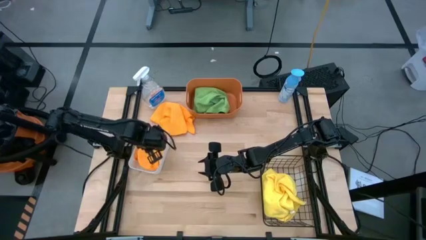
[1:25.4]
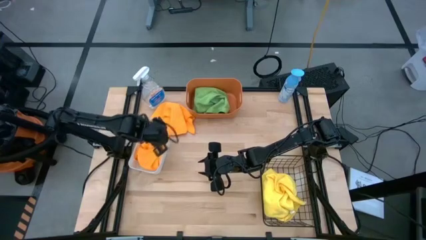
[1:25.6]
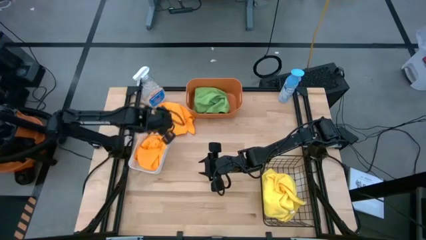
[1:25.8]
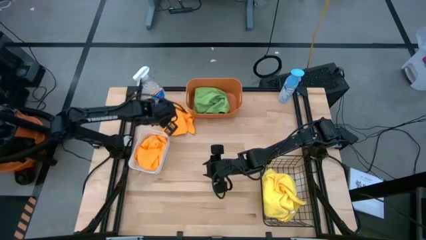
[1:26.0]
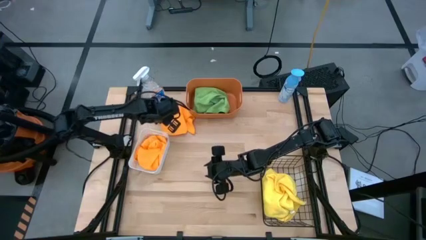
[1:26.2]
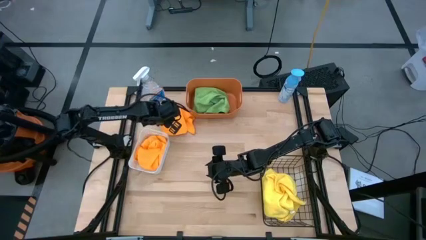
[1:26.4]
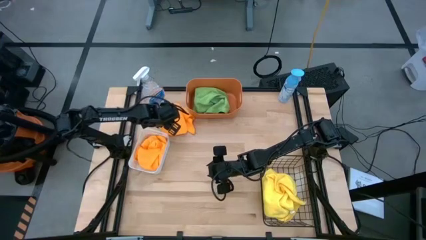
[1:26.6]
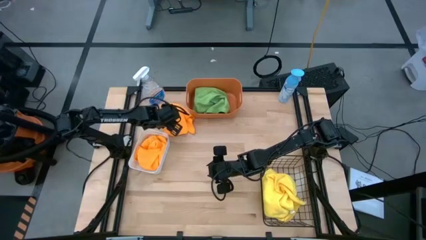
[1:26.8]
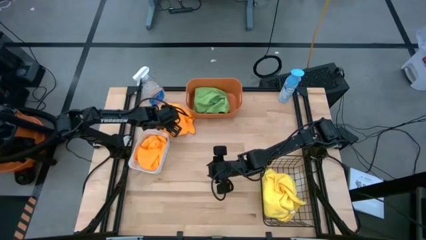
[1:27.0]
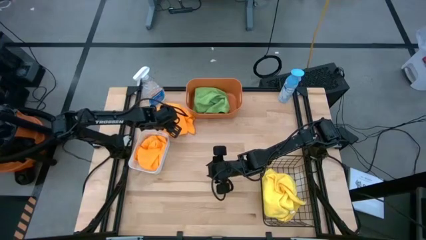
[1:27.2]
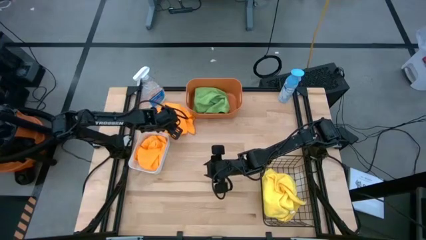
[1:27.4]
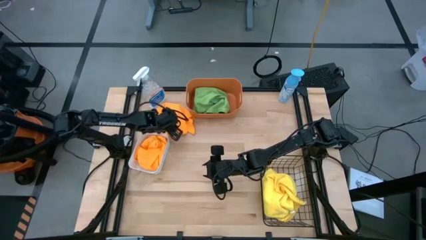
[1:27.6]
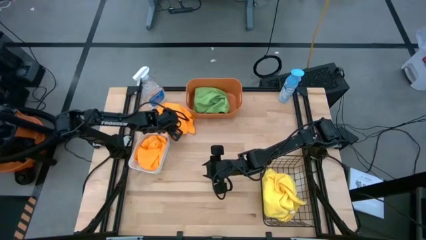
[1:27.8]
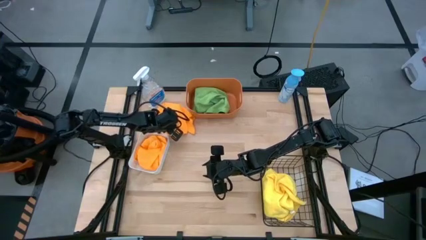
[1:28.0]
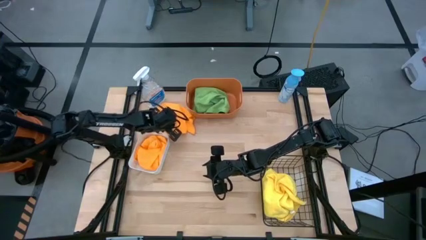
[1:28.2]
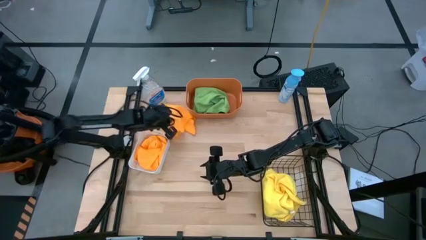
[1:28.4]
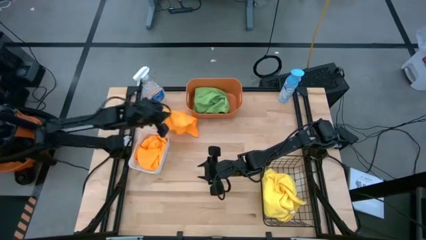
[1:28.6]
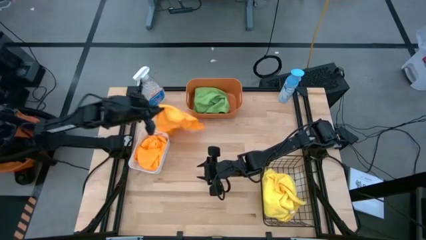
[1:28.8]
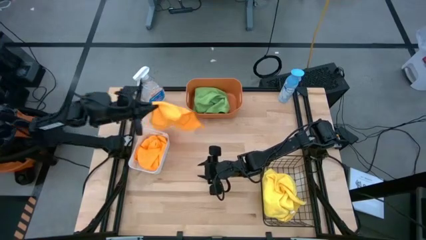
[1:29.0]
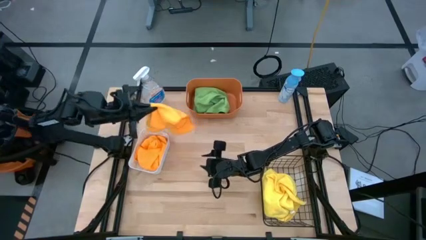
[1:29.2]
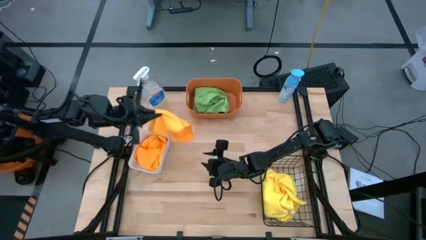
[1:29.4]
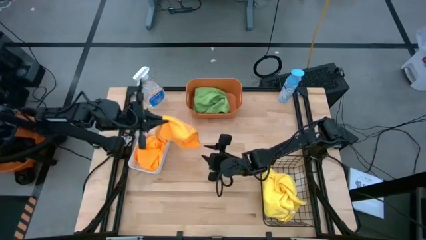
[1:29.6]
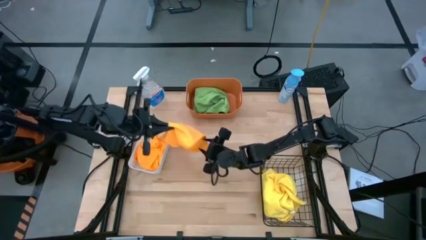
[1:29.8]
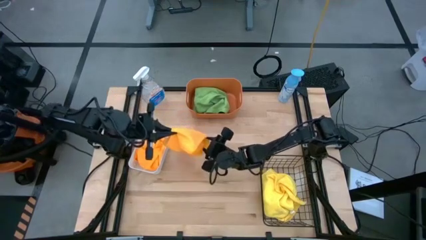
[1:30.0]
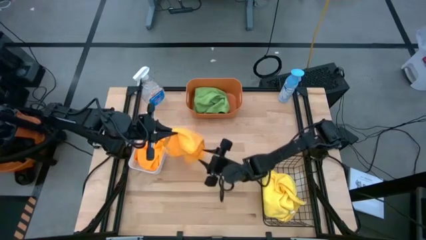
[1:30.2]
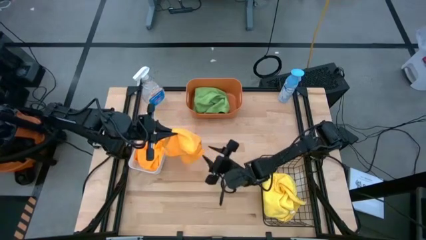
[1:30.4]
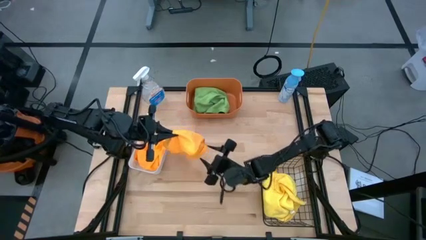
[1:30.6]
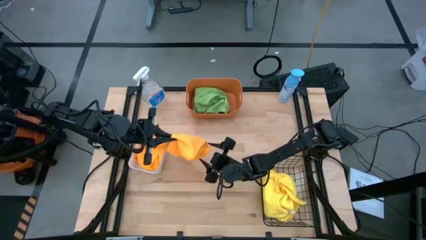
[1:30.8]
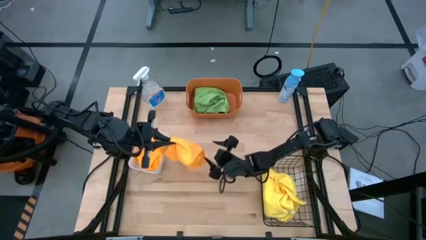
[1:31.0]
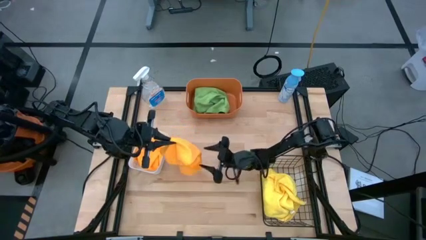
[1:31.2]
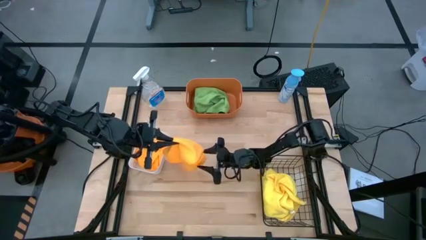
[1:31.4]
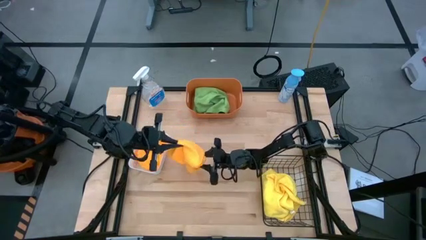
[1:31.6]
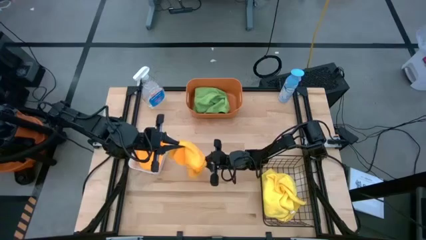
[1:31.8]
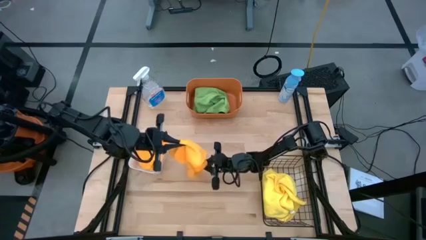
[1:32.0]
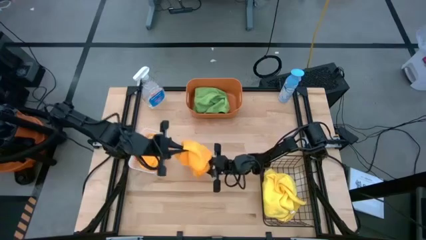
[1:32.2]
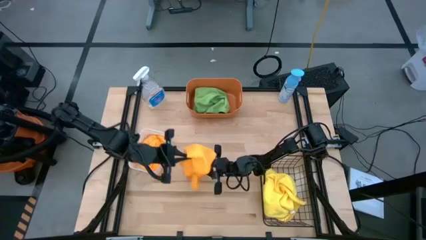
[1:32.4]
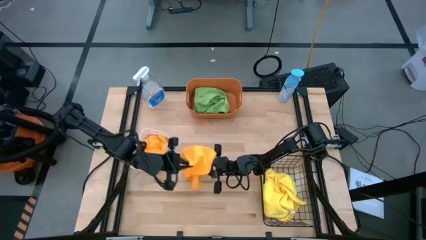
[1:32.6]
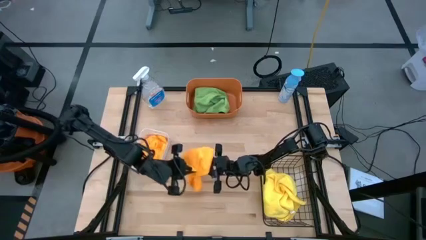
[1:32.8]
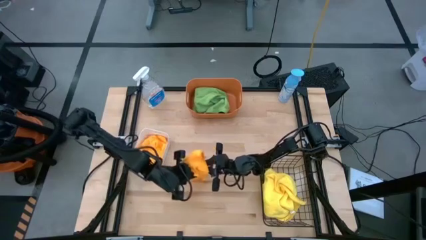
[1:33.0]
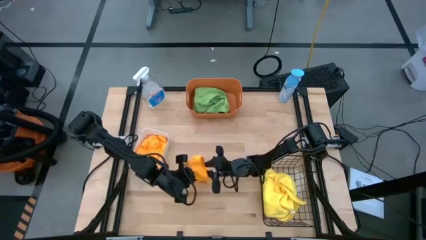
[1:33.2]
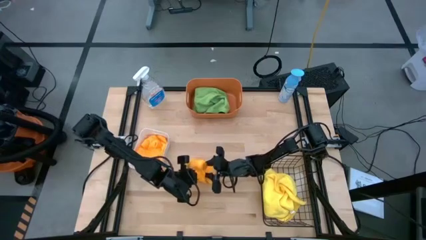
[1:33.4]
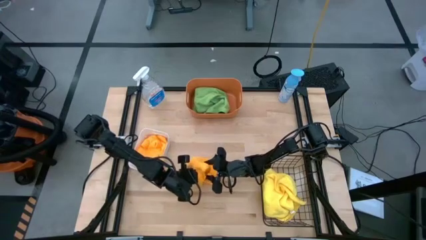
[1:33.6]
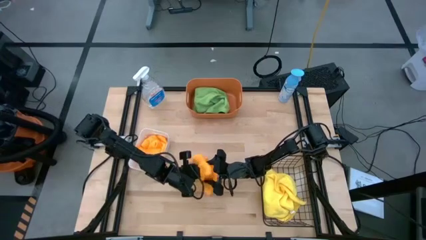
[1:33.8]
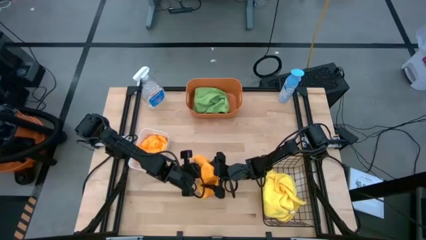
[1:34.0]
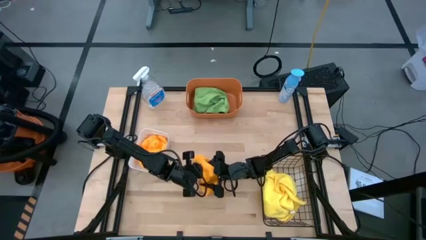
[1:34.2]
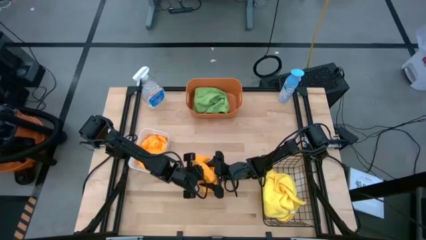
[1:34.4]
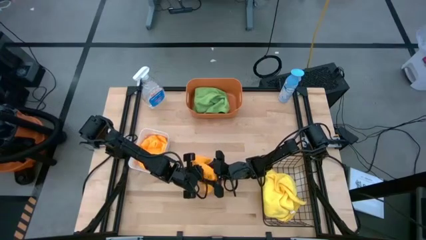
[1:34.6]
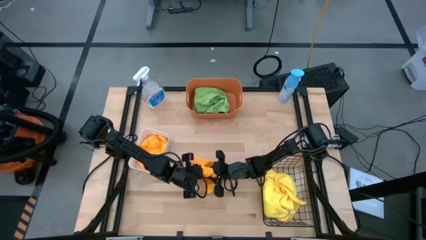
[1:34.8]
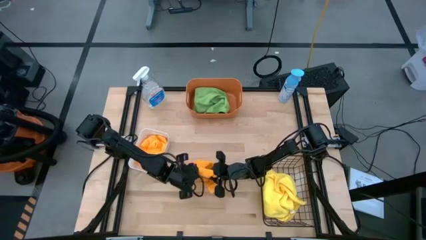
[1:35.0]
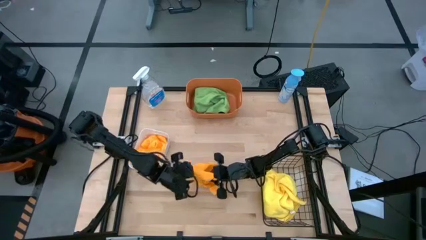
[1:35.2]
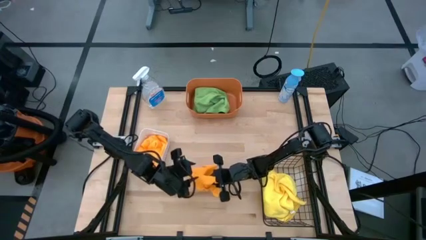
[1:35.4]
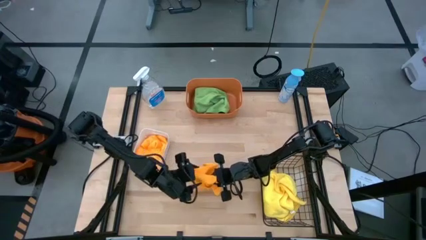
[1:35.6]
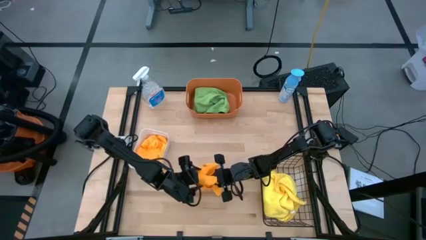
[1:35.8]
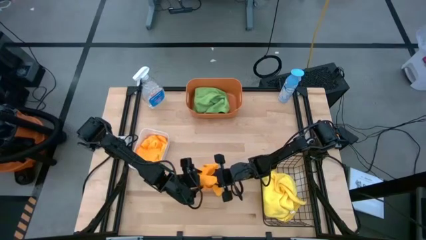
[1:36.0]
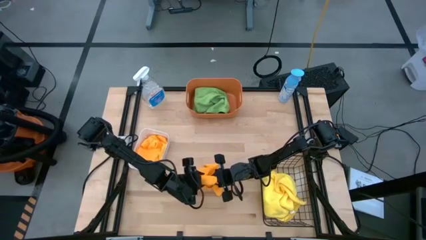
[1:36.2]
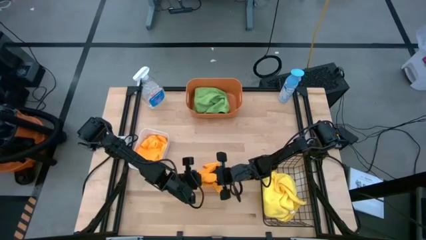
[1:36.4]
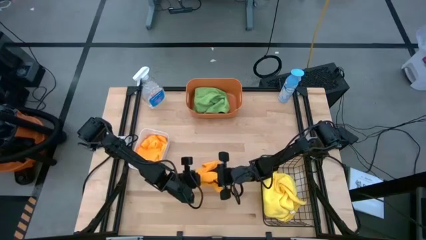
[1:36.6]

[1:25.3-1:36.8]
Task: Sort microfiber towel by color & place in baskets
Put the orange microfiber cloth into the white bin

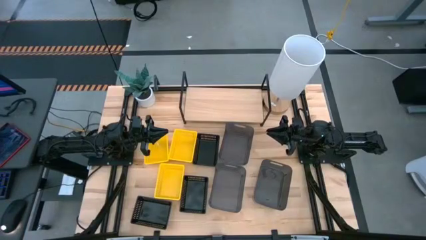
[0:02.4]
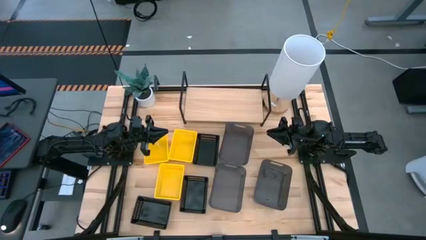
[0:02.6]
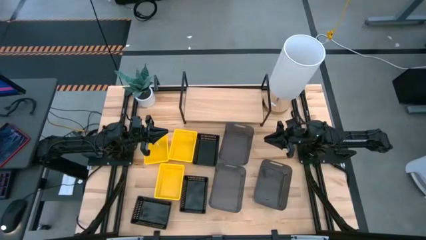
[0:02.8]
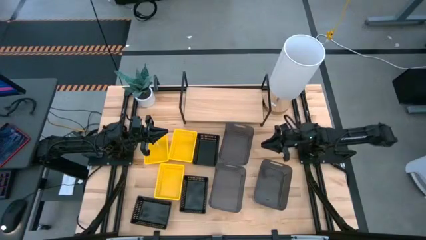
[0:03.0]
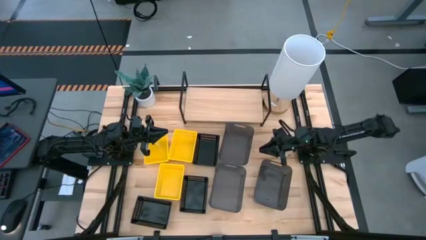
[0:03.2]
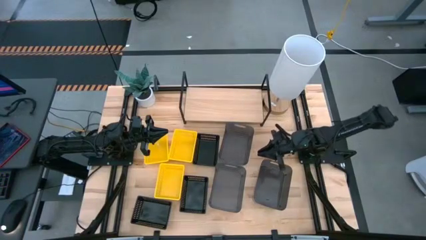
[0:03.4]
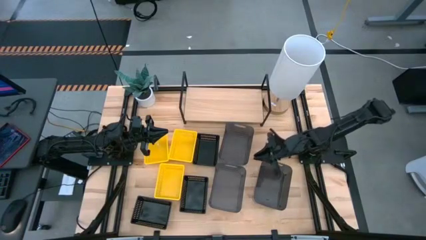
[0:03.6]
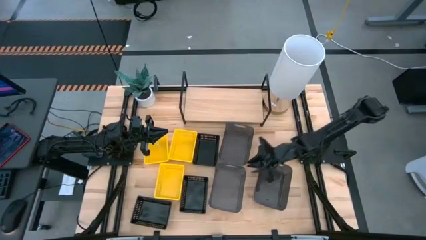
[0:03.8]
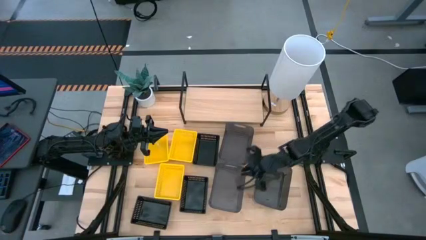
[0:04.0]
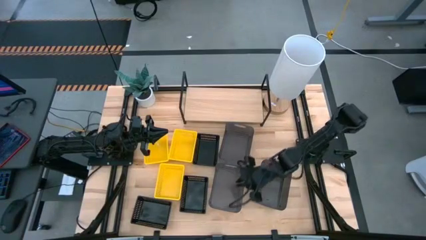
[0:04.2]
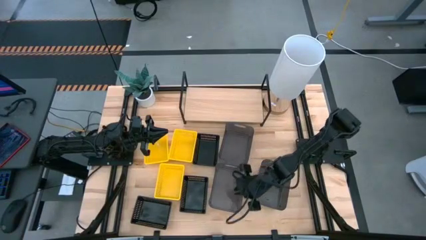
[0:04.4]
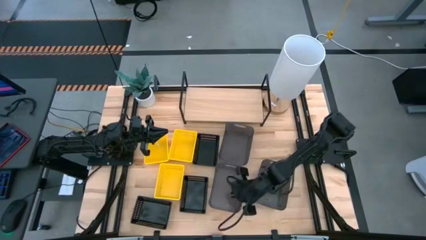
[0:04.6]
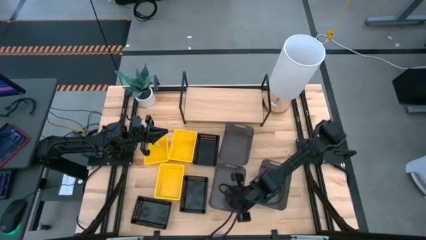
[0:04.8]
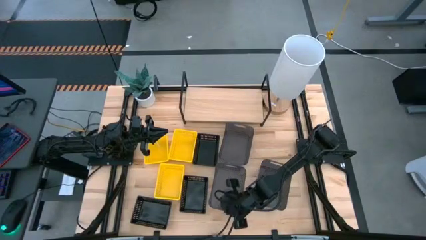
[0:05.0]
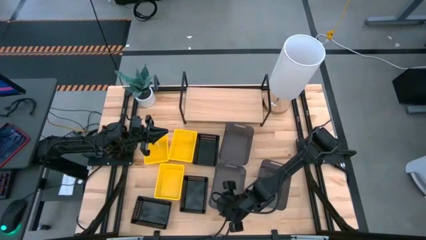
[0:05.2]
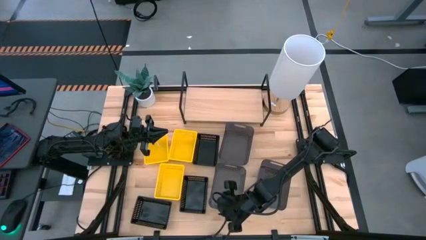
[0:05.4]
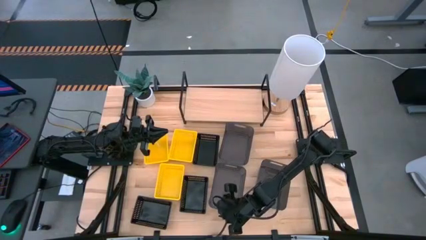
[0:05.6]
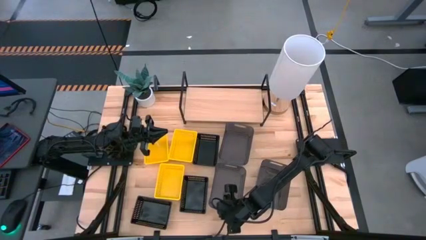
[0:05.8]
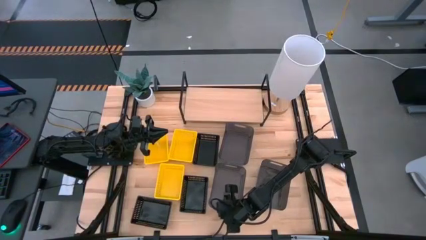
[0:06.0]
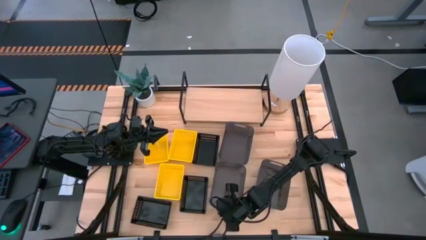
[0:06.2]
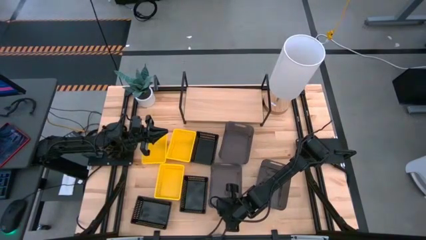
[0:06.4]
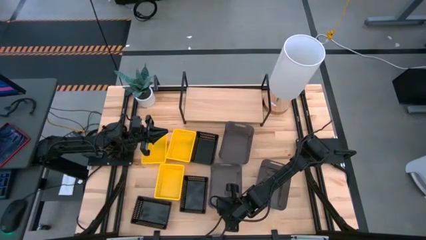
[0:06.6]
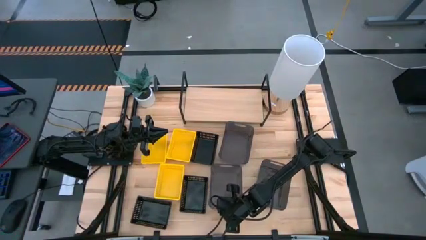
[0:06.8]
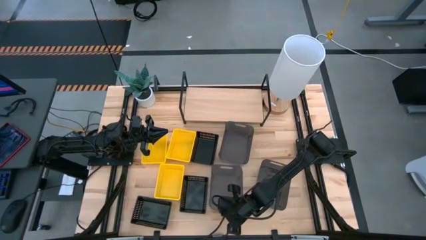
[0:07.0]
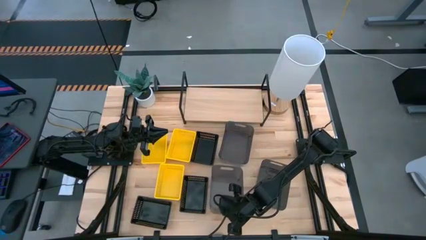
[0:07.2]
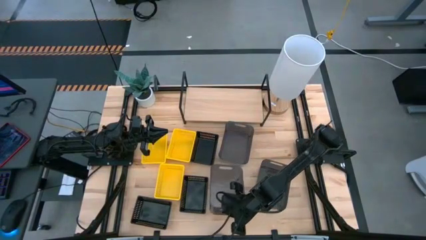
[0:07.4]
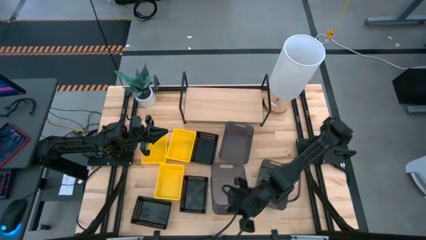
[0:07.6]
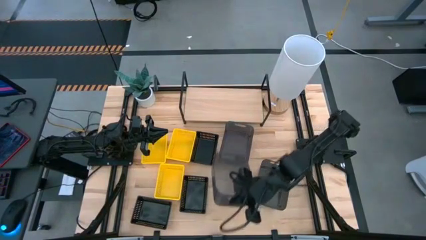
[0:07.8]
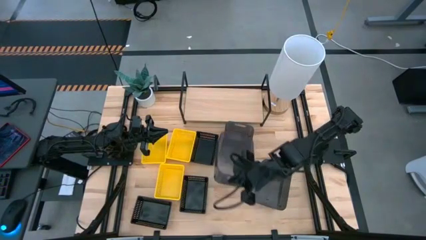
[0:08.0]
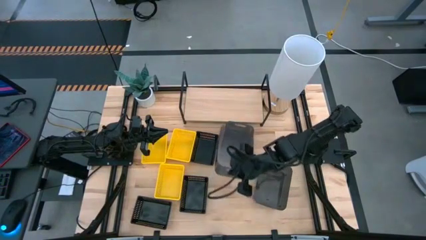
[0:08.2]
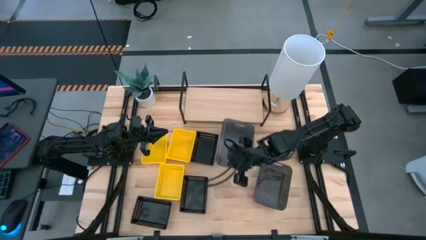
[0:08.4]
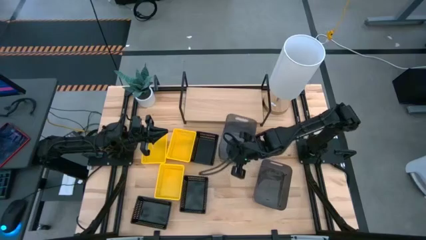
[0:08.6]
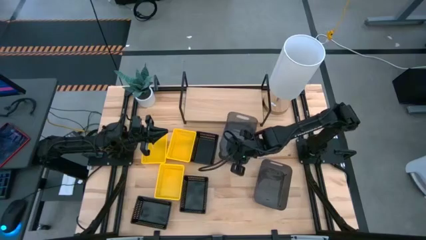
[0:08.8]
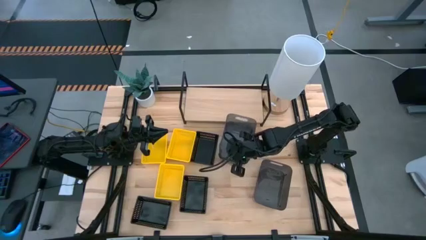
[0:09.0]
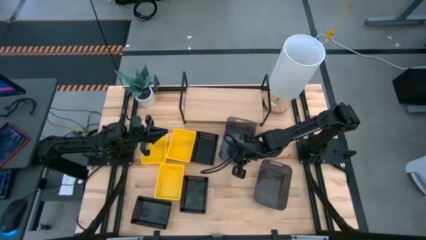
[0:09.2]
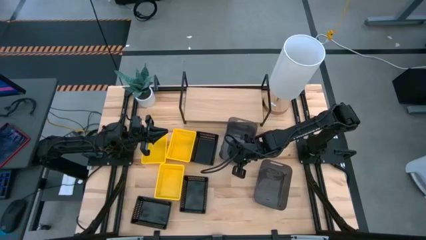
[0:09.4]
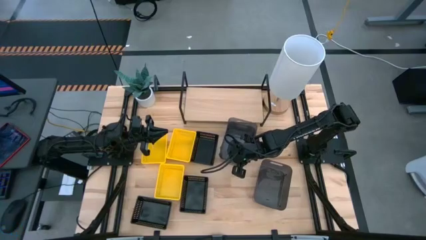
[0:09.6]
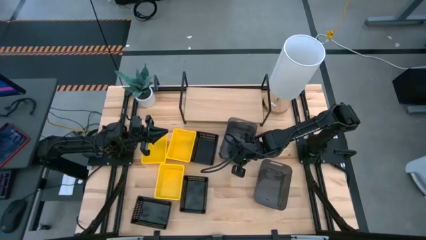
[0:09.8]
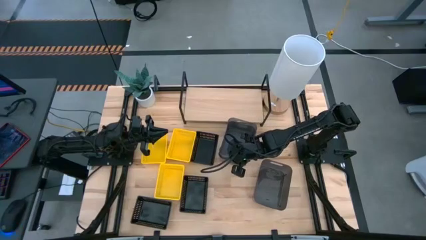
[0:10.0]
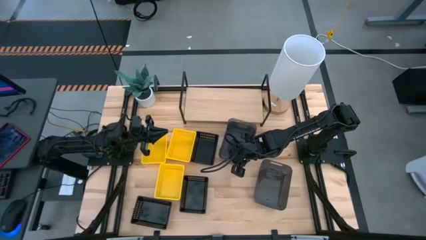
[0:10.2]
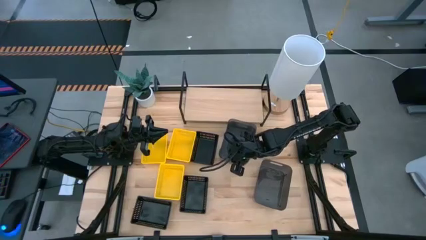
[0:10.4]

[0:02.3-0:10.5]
Task: Stack baskets on shelf by color
Stack the bottom transparent black bin on the top transparent black bin
